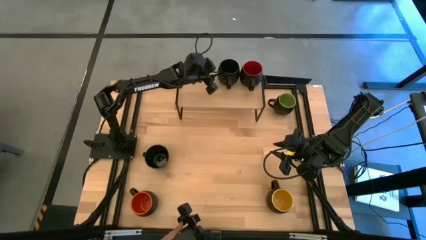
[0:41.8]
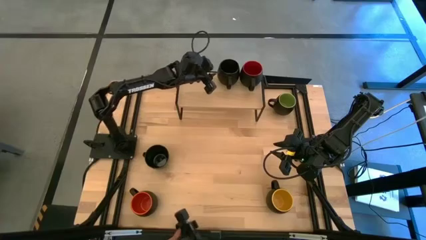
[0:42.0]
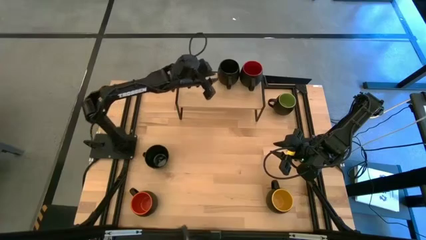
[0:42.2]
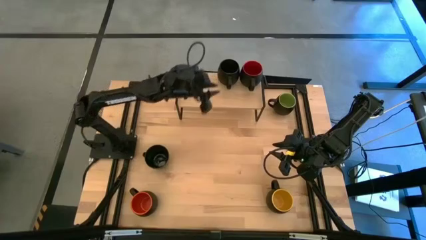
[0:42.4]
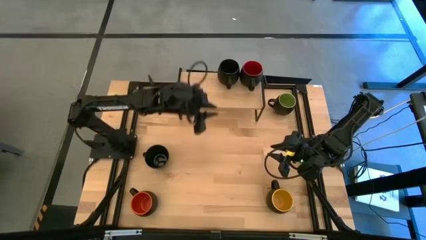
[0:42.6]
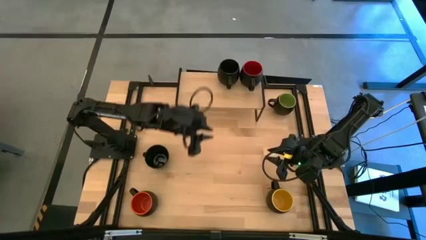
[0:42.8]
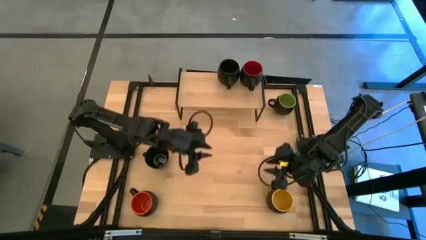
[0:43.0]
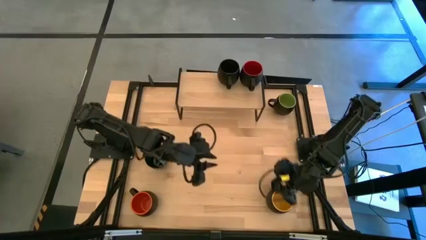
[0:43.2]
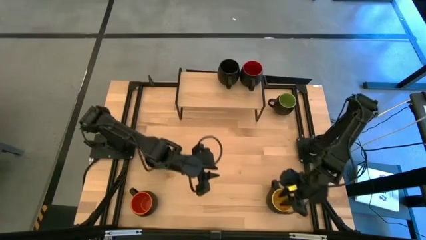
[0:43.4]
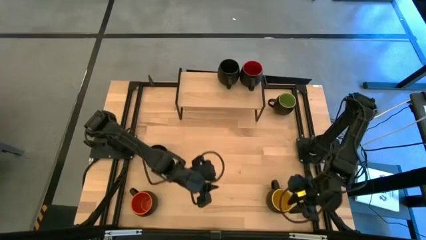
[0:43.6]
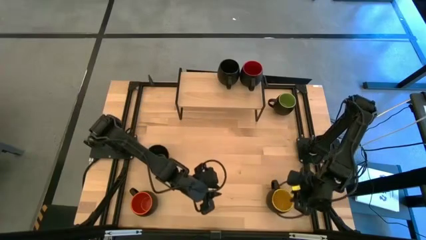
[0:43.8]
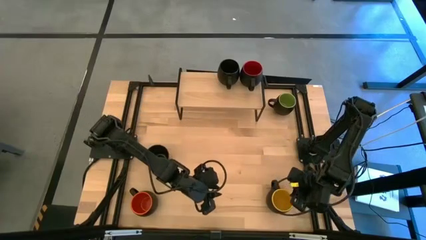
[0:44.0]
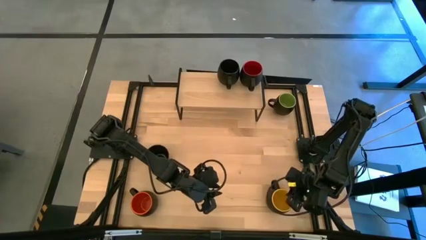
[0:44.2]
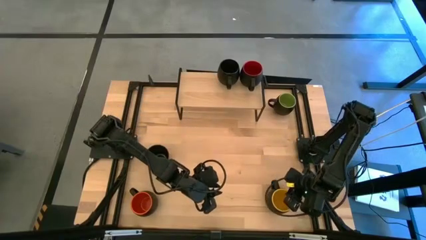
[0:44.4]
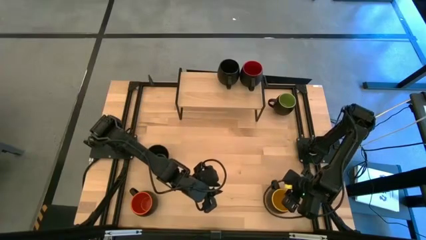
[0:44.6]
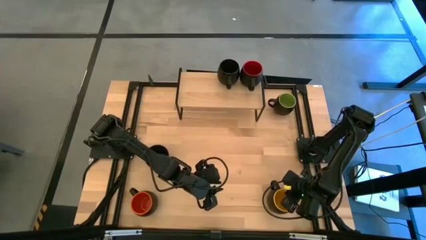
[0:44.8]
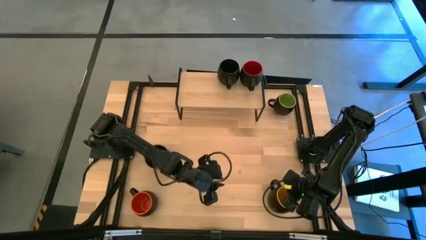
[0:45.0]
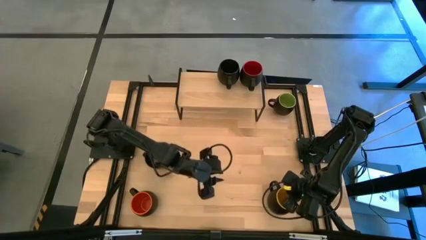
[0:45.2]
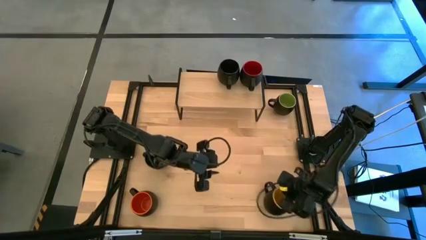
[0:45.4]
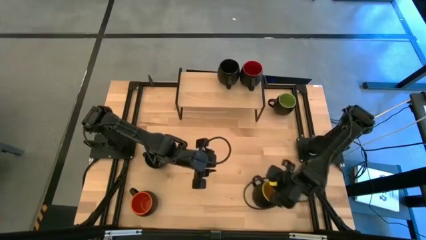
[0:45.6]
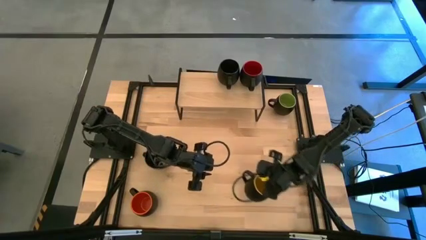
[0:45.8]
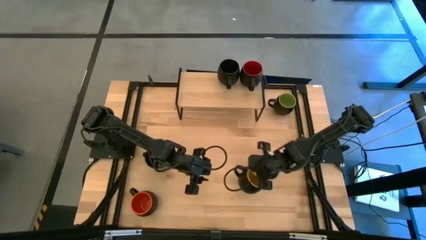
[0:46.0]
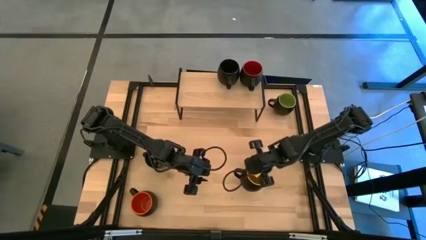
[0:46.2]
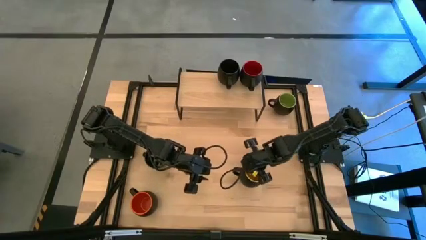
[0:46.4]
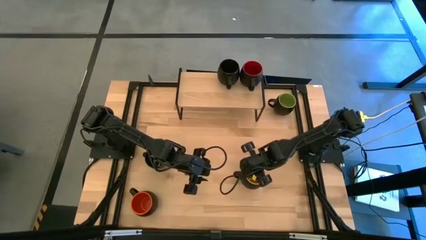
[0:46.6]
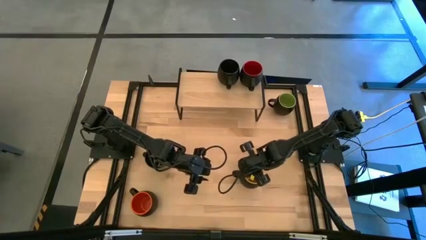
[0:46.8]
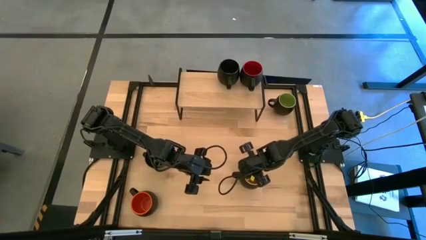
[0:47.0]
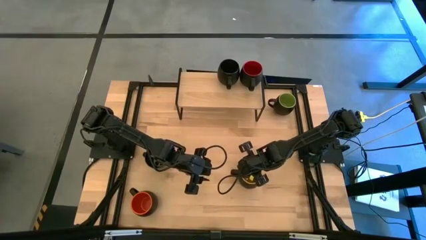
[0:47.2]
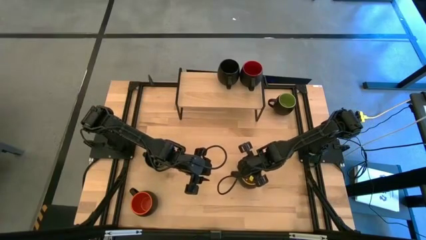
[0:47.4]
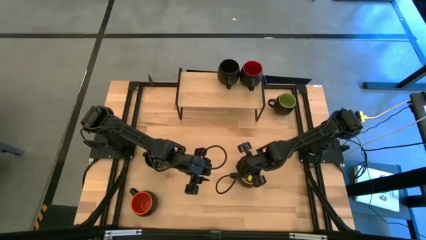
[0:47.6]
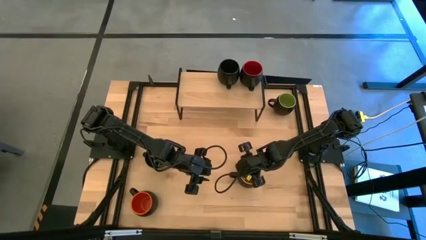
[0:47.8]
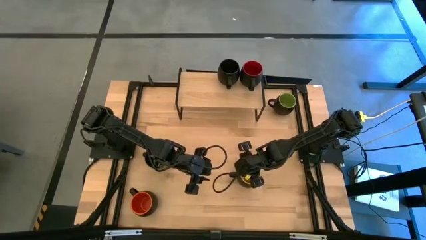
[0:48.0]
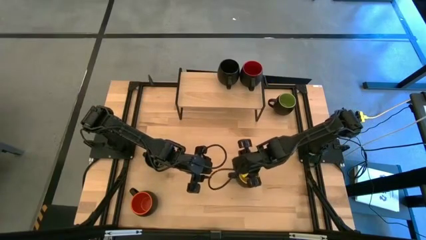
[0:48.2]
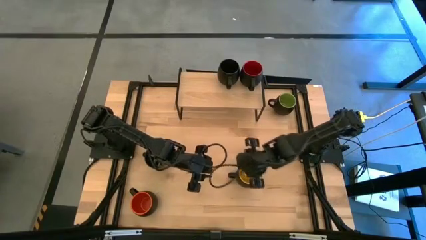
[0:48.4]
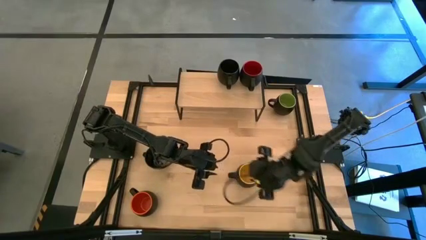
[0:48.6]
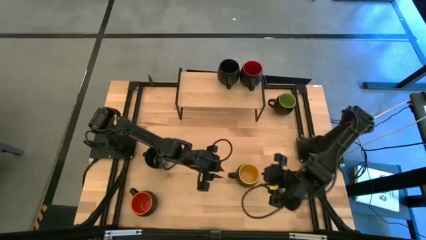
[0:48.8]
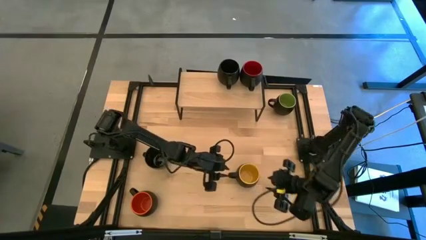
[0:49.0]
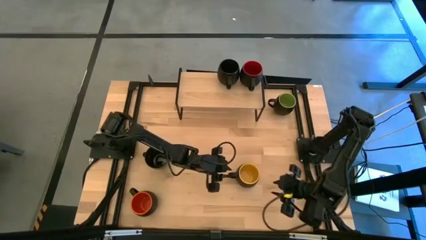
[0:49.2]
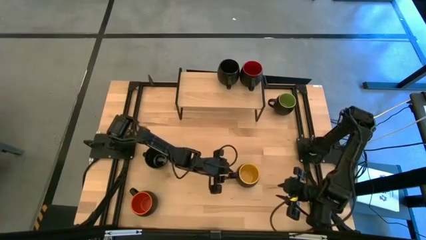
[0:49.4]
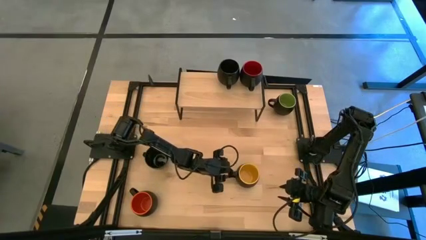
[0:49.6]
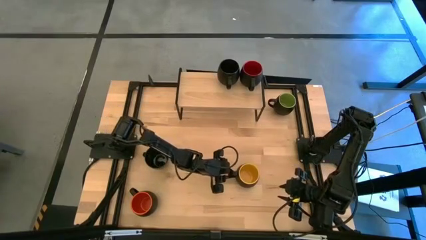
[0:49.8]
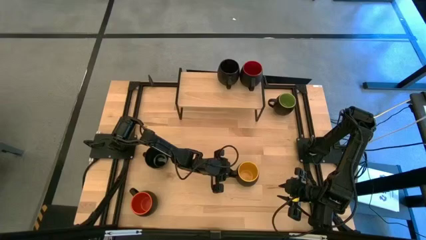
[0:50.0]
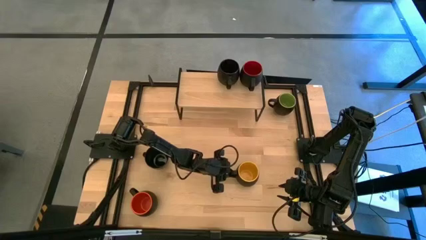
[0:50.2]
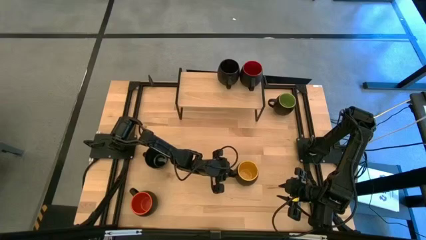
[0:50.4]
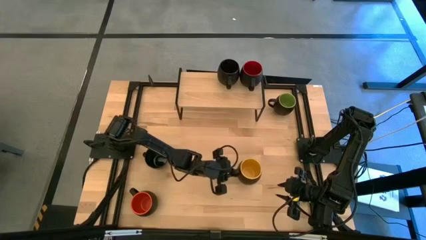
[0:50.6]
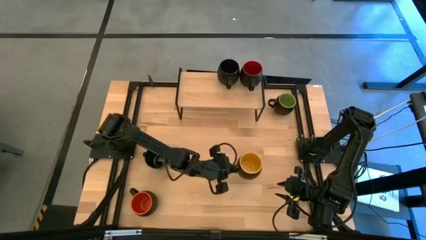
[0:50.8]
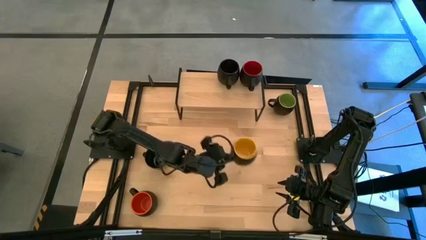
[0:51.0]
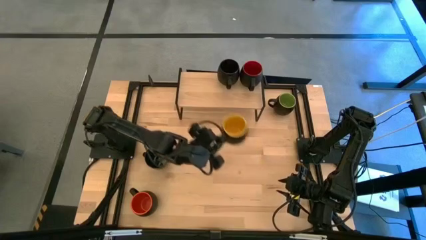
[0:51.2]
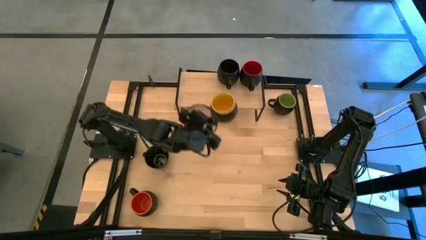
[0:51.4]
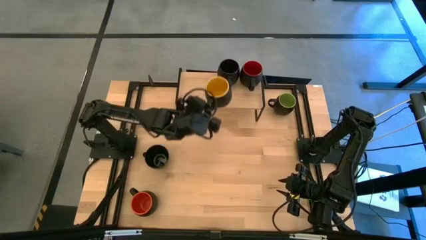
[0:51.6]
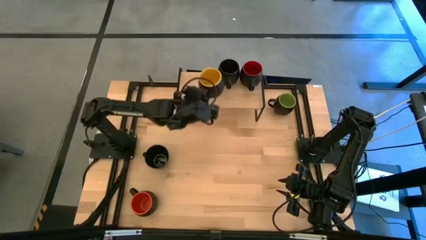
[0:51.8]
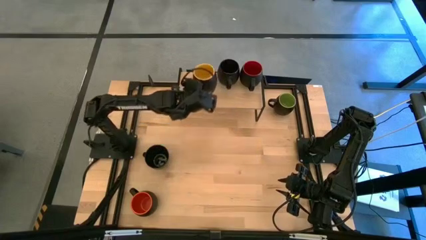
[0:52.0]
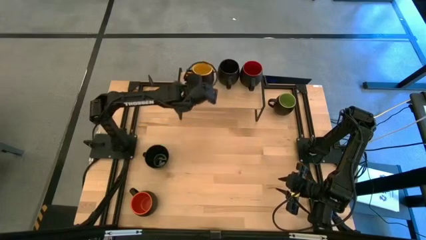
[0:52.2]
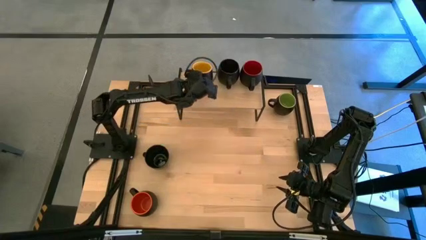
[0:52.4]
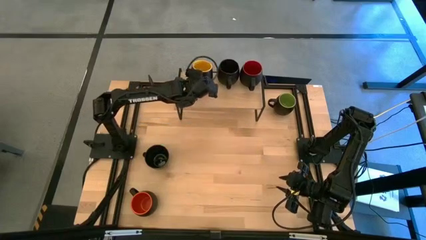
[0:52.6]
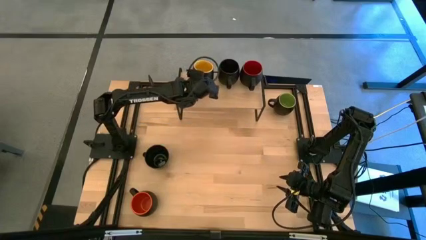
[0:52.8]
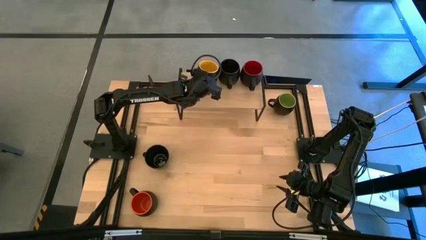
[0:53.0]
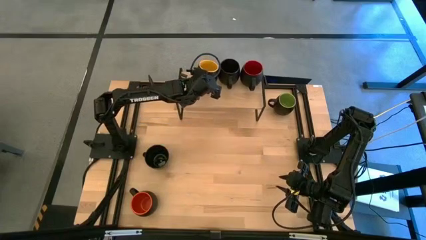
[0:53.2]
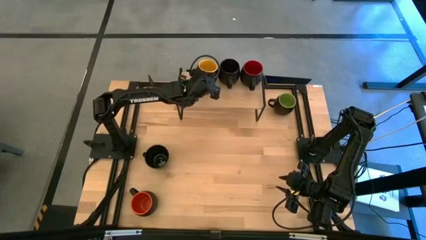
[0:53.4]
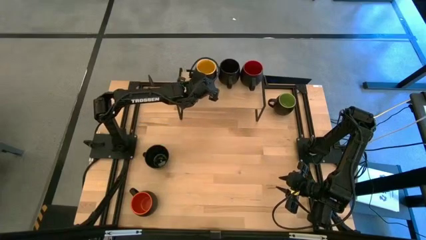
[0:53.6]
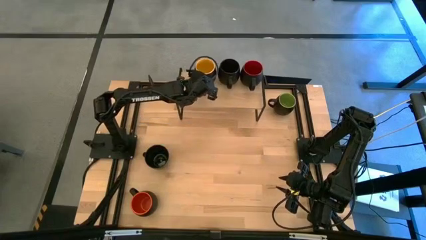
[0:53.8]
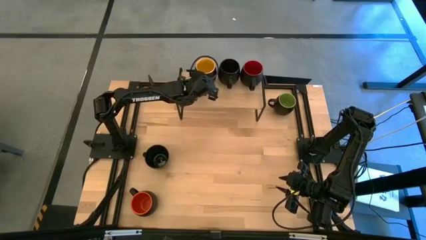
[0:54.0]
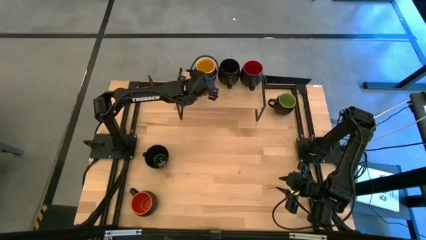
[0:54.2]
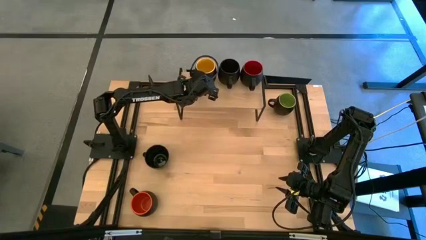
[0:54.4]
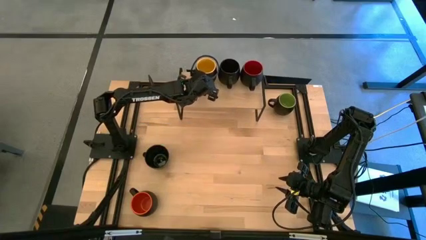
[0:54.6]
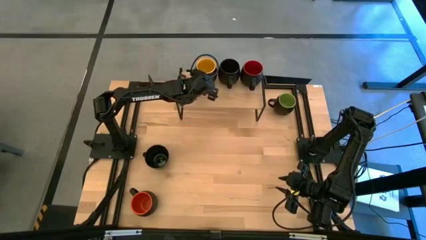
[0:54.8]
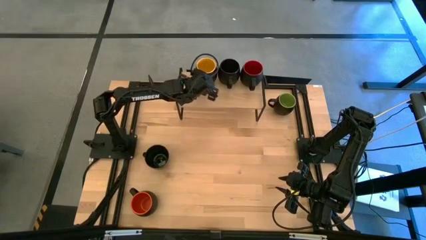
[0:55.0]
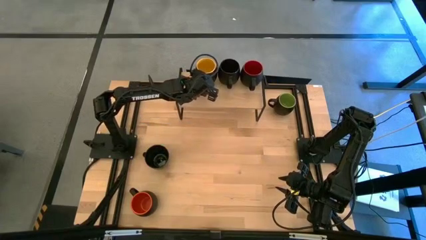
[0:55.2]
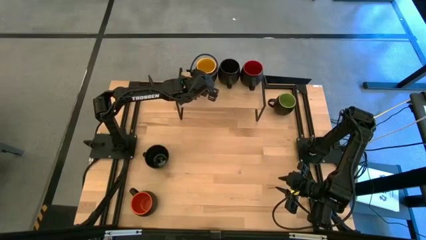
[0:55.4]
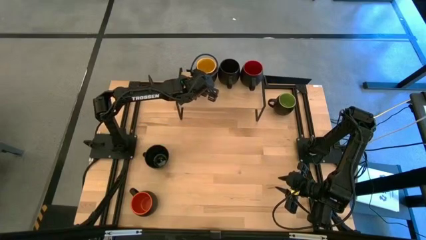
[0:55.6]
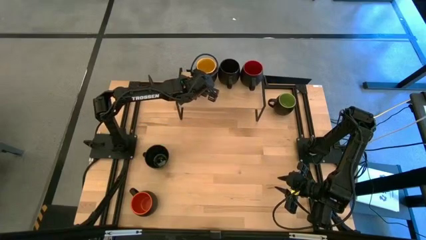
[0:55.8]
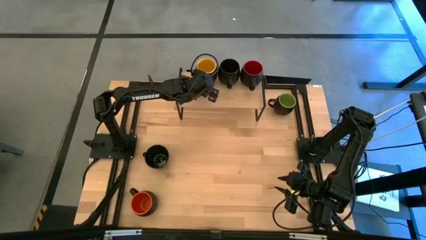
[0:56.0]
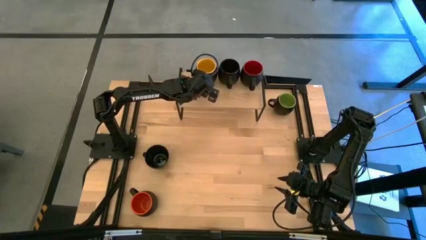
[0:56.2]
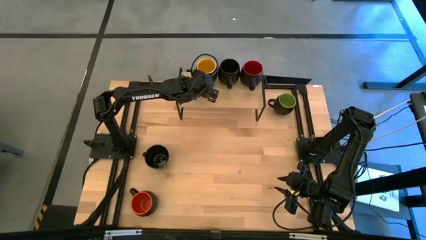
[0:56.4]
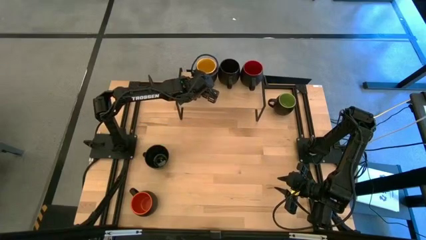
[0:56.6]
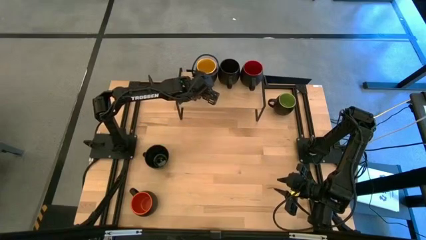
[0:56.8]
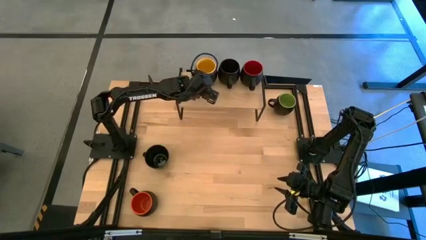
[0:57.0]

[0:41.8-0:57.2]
Task: Place coffee mugs
Put the yellow mug on the shelf
